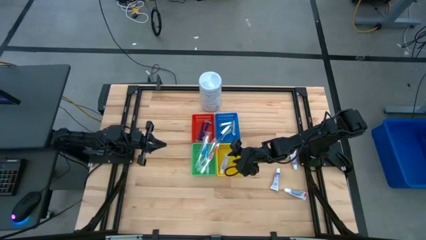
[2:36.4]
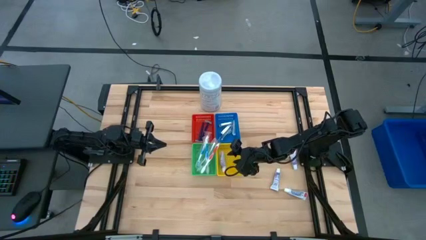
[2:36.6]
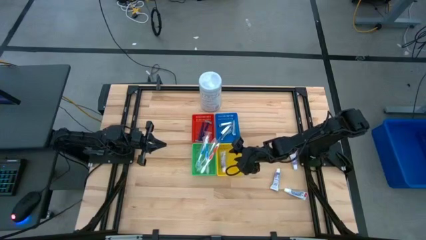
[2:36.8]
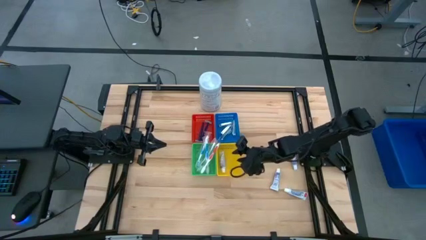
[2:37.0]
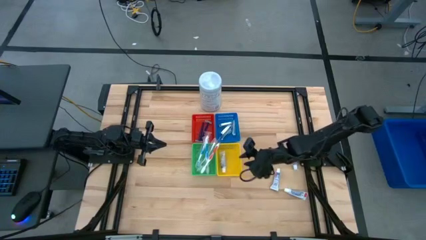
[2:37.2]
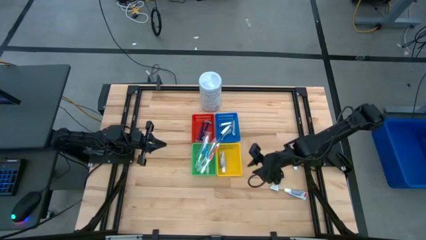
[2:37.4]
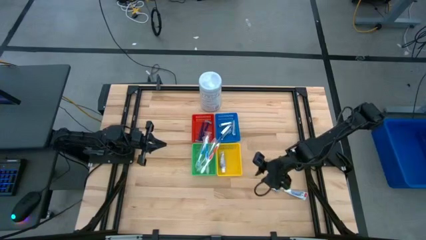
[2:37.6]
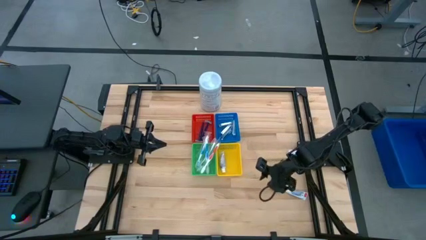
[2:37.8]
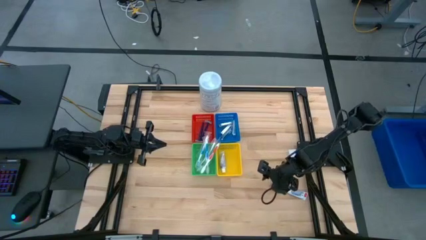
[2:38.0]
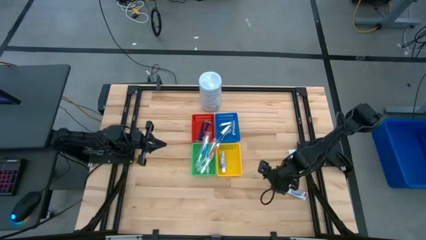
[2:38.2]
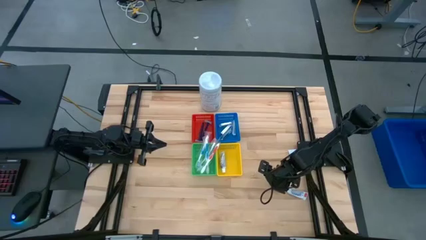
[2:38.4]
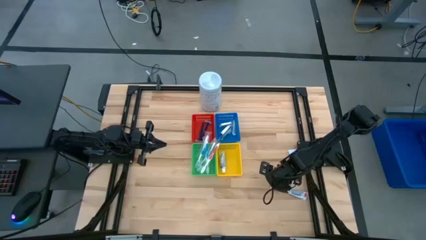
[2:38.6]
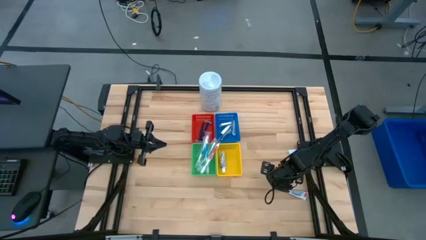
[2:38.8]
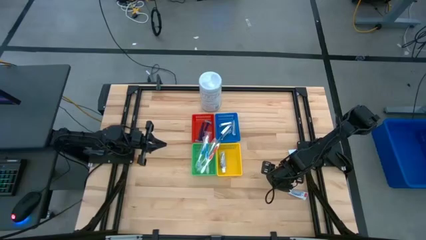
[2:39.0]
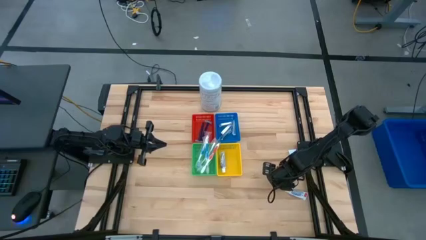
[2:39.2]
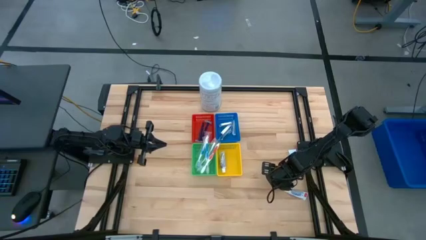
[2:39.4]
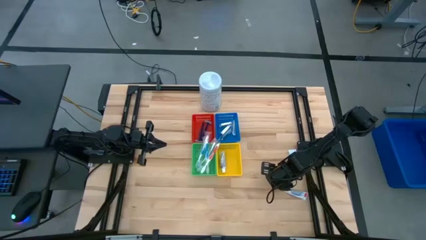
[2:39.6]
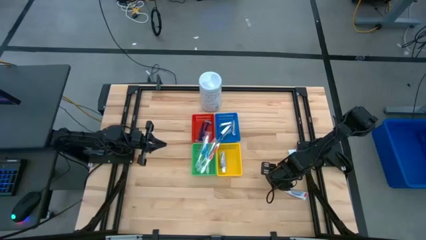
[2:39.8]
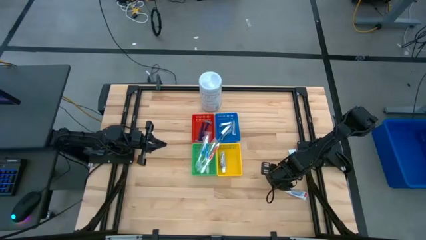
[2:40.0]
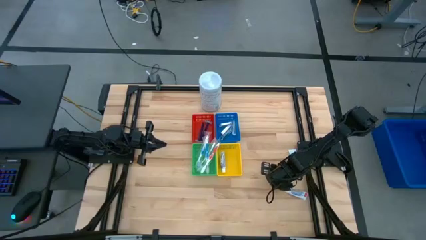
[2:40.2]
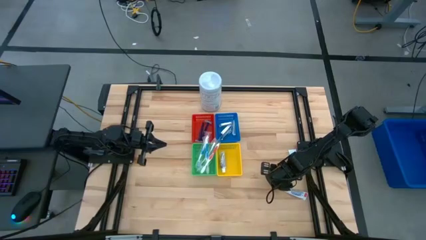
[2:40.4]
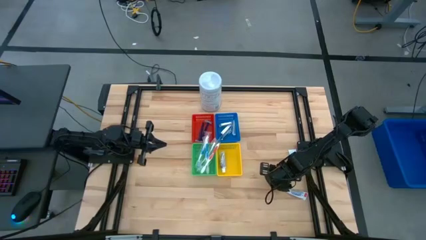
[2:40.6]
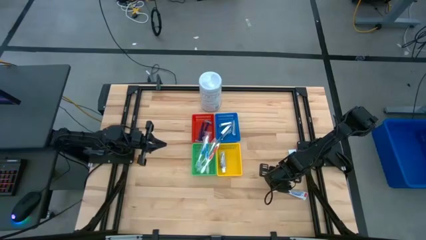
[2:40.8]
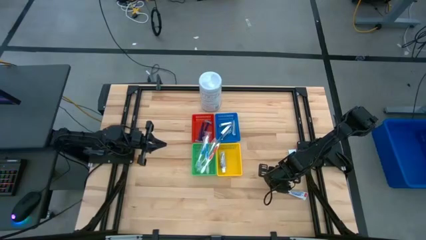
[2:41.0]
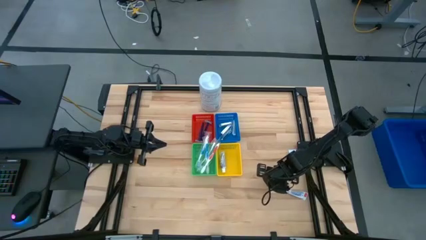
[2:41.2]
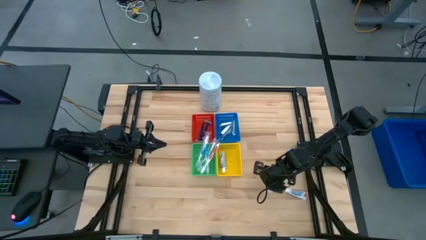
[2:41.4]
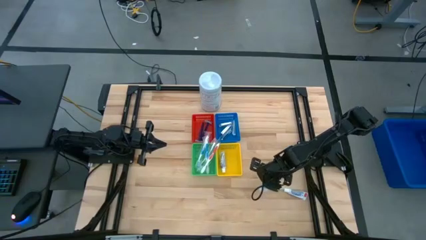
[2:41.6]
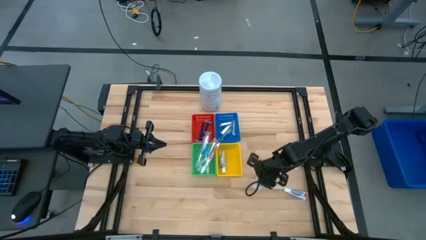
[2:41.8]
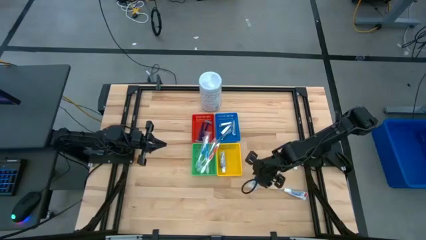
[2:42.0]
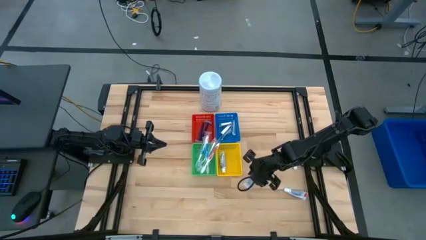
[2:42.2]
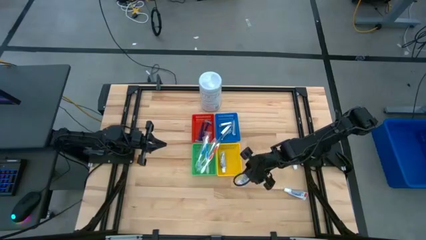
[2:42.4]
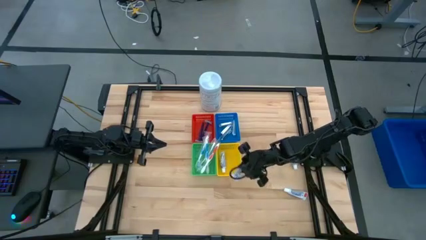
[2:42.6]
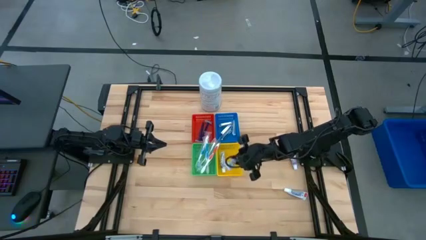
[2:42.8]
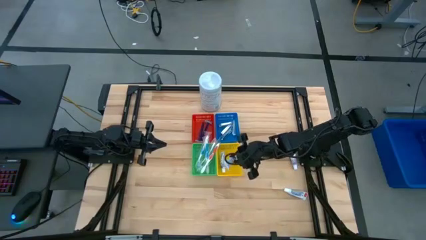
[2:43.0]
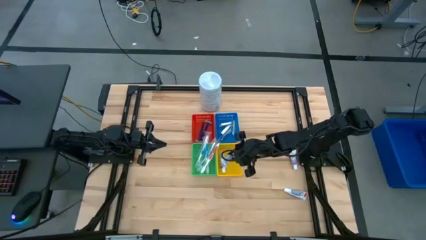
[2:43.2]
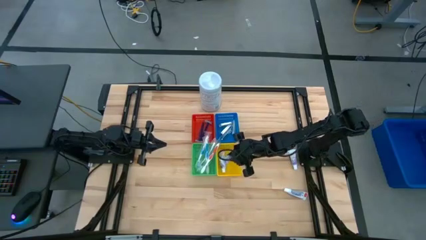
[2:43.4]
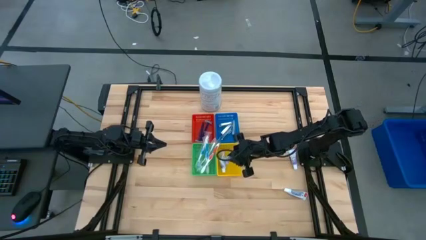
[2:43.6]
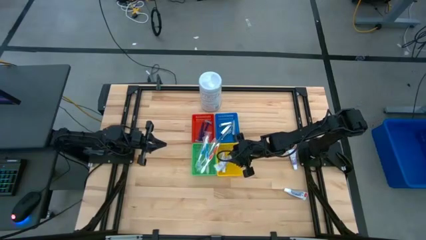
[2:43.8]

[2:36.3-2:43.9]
Task: Pick & Place Travel size toiletries
Put the white toothpaste into the yellow bin

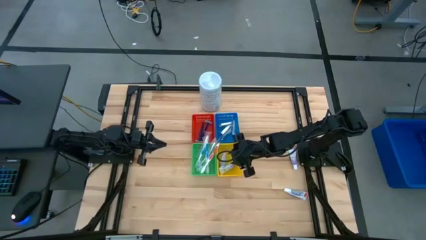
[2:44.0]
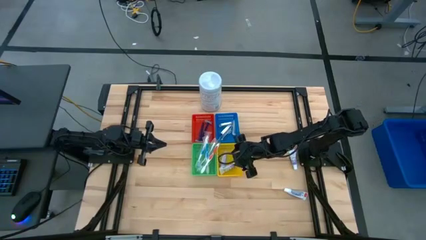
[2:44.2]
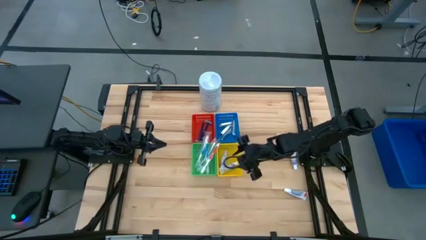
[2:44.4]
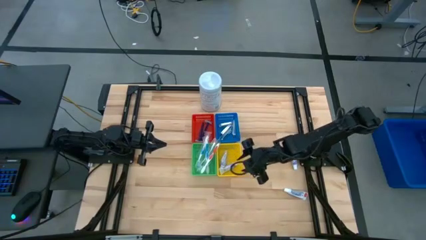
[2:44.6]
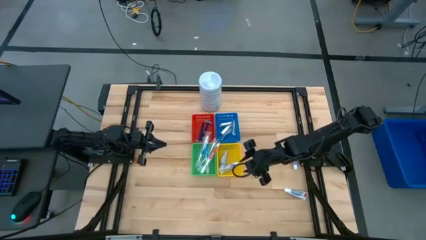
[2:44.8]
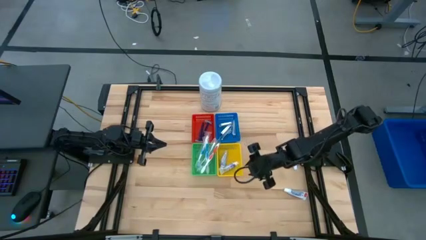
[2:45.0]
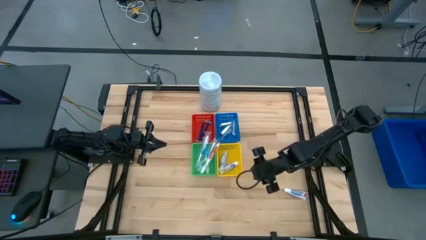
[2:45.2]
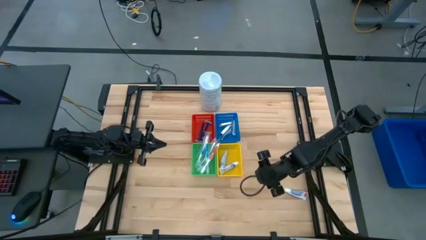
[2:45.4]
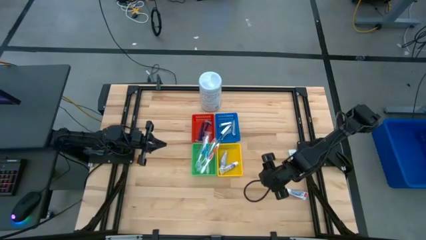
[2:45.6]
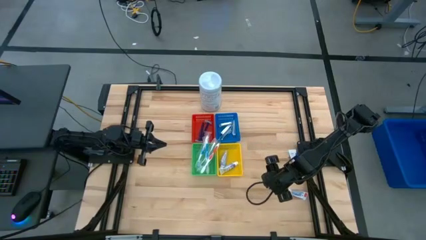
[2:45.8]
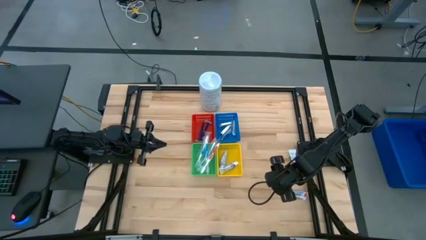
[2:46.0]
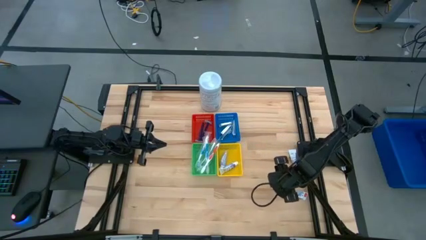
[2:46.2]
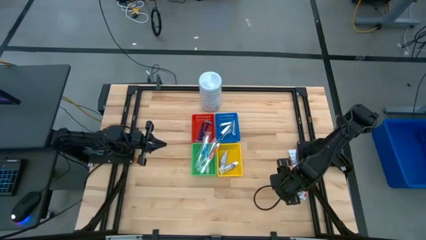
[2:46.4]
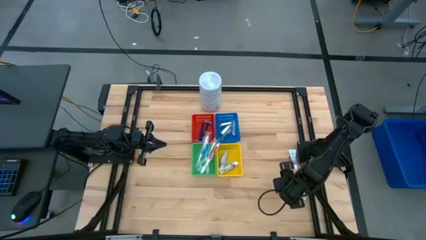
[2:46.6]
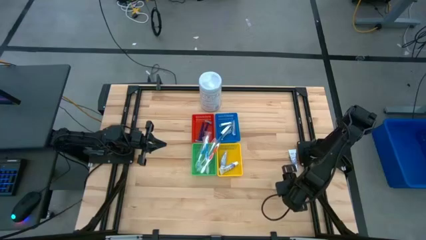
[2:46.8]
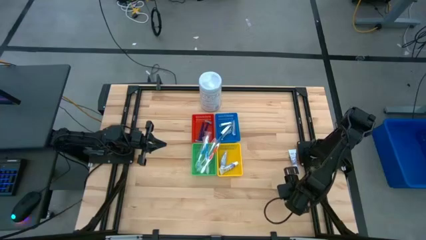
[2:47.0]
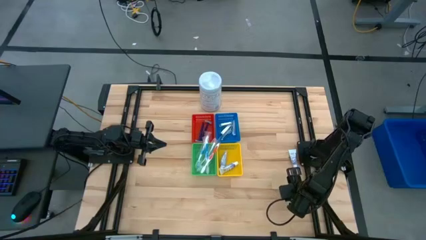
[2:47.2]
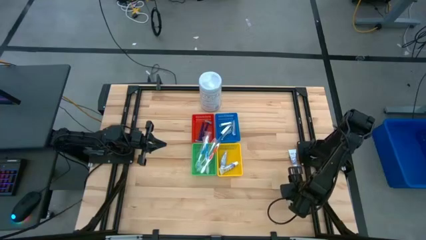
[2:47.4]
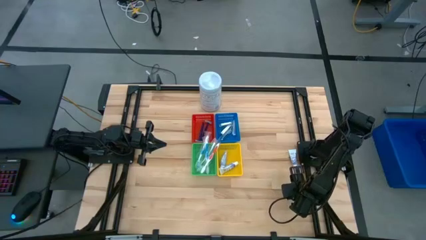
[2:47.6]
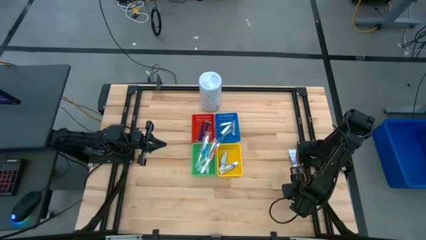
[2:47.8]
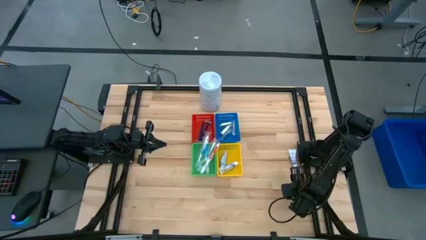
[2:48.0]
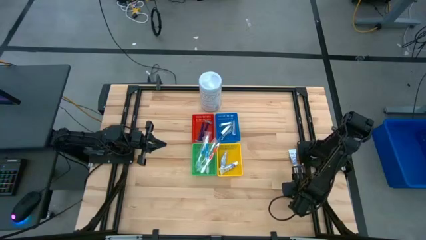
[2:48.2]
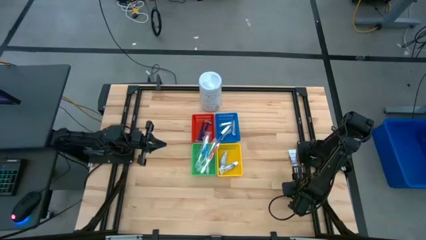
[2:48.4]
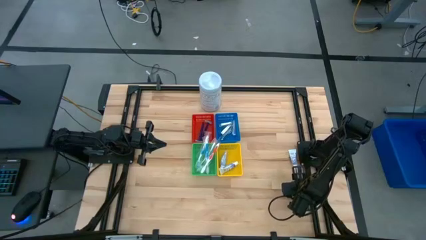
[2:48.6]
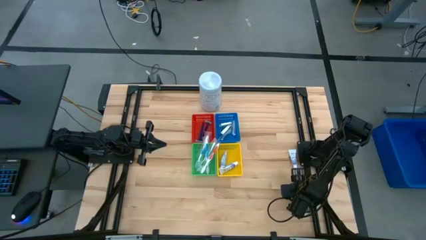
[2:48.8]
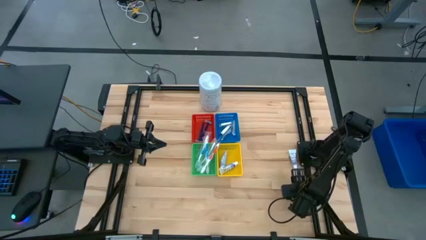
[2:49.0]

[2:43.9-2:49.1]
Put the white toothpaste into the yellow bin

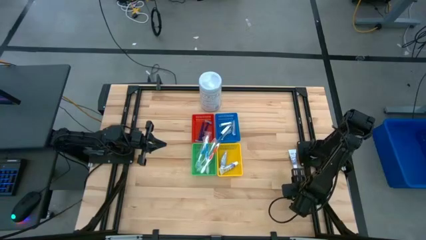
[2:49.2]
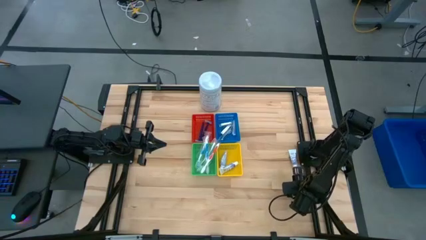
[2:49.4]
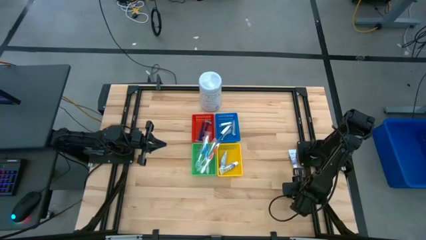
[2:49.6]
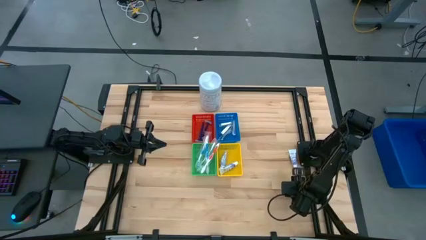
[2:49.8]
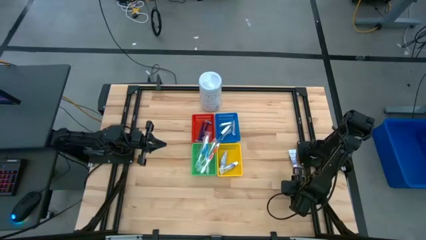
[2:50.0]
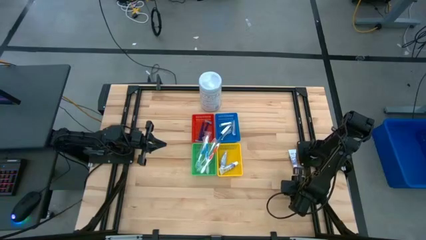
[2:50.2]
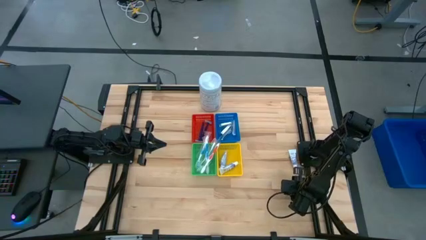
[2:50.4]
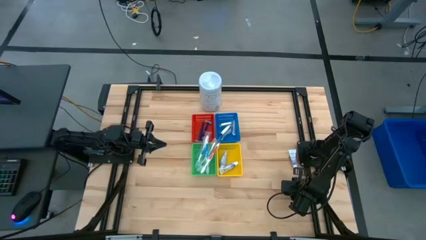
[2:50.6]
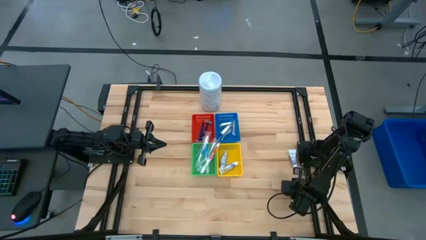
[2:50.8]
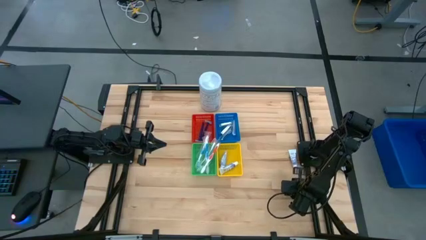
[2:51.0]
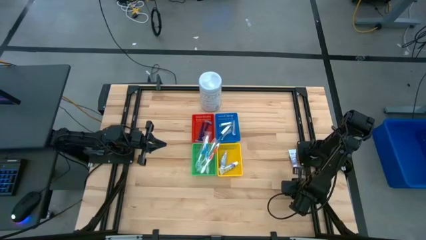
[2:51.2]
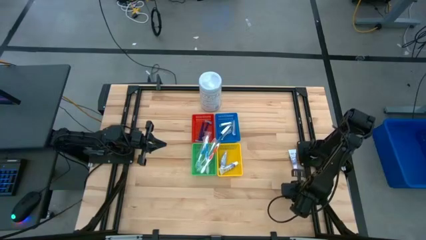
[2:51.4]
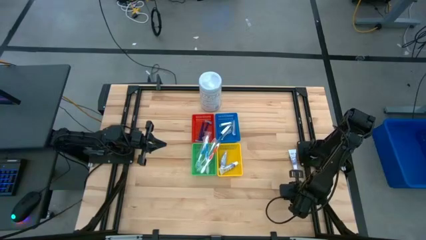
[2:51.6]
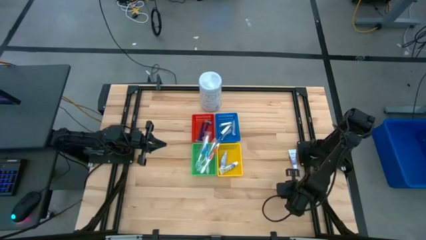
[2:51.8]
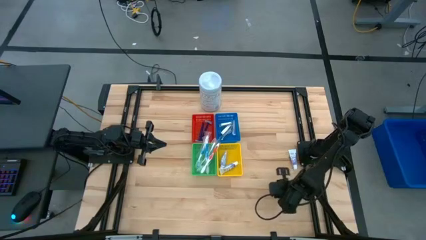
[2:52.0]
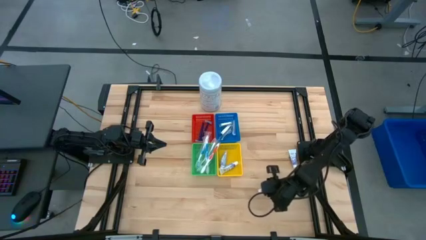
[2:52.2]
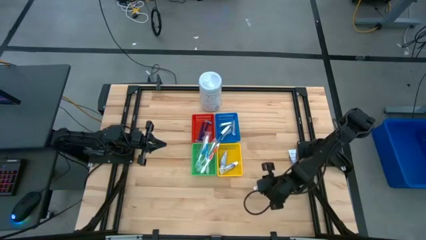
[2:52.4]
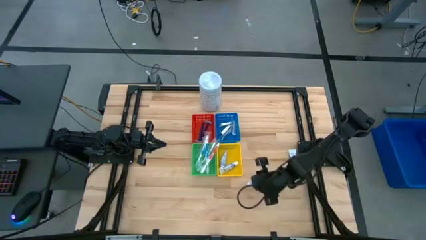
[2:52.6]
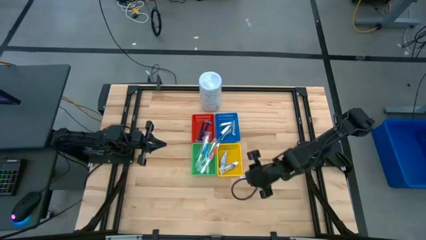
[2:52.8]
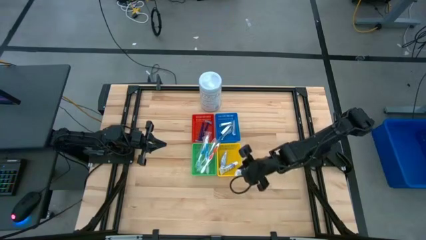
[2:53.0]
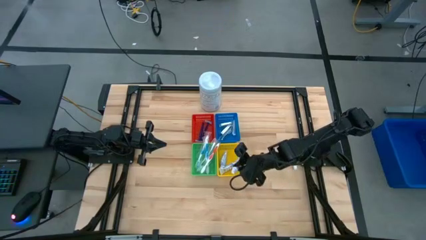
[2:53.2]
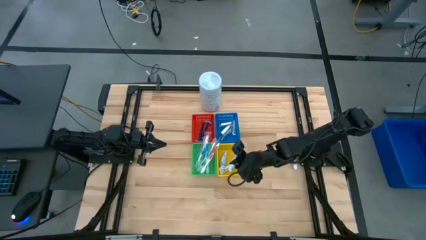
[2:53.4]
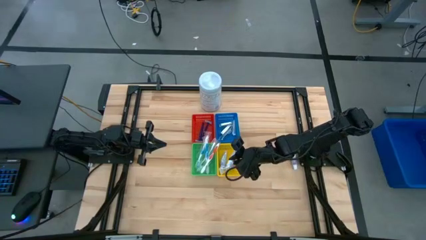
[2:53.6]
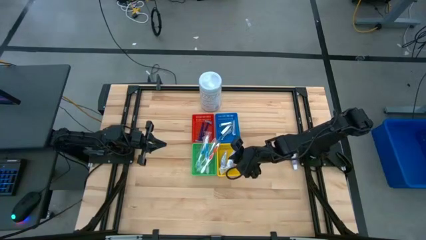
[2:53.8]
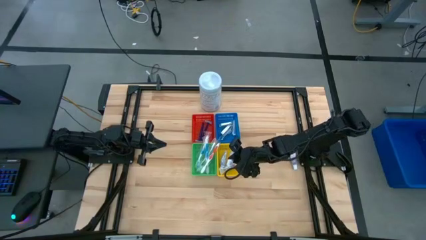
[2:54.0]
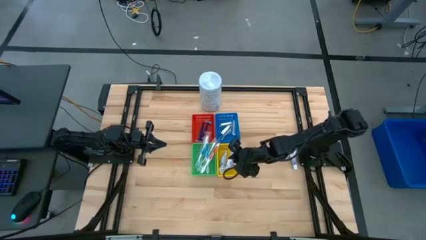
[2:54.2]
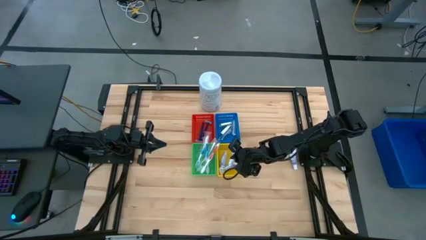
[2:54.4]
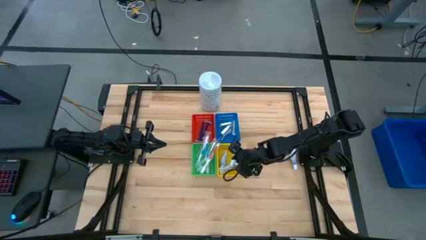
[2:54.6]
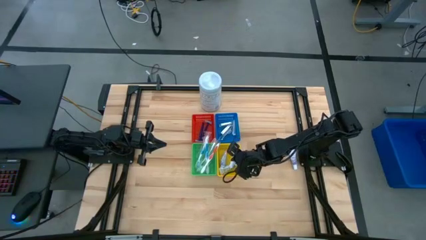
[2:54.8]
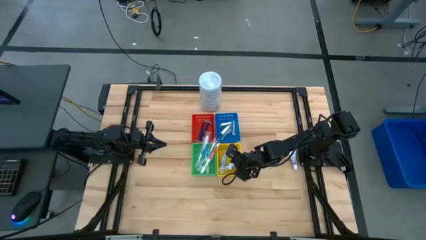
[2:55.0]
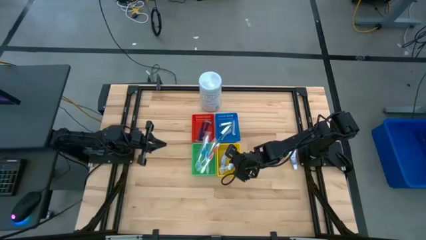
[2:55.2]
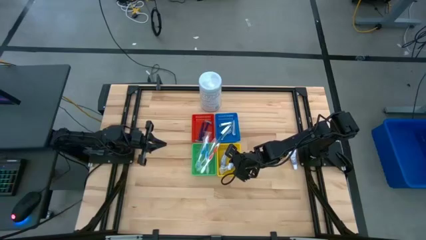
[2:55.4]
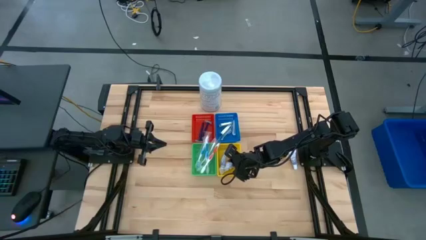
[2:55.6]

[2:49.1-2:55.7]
Put the white toothpaste into the yellow bin
